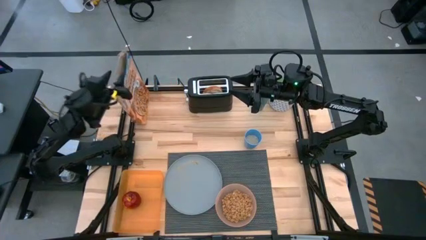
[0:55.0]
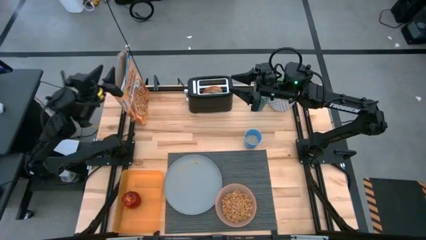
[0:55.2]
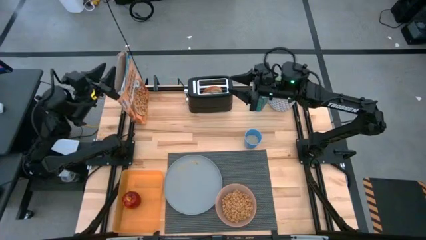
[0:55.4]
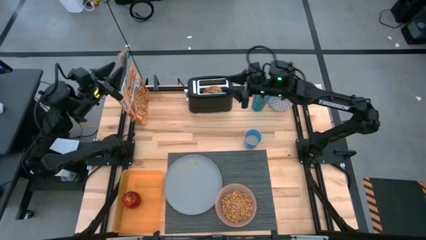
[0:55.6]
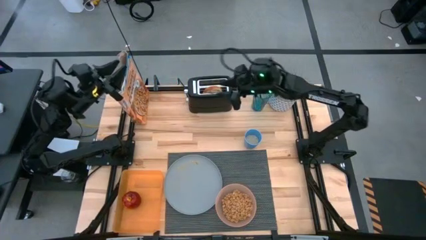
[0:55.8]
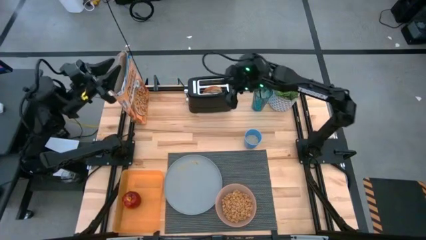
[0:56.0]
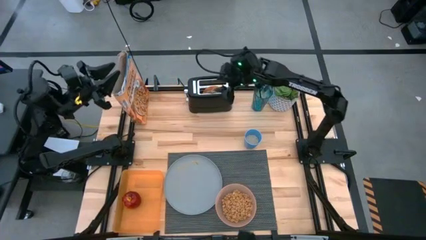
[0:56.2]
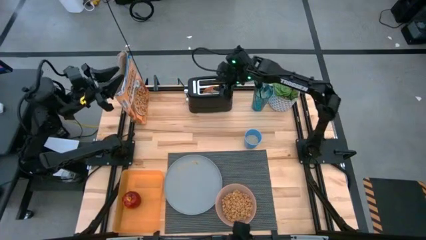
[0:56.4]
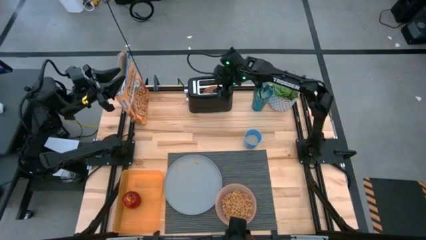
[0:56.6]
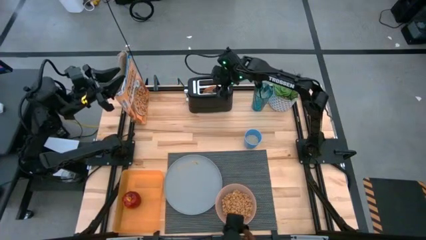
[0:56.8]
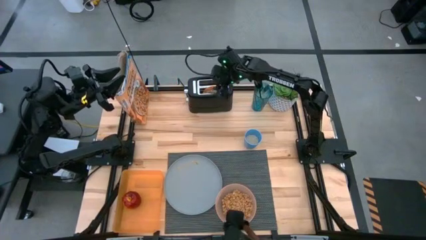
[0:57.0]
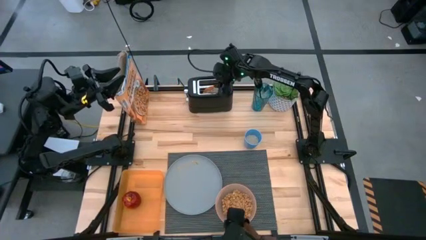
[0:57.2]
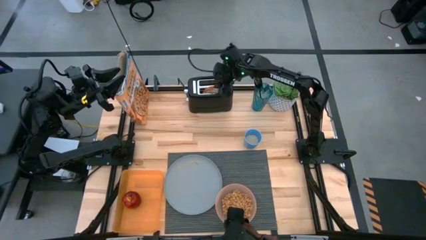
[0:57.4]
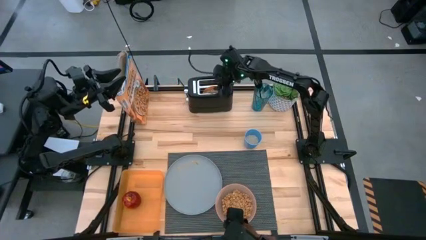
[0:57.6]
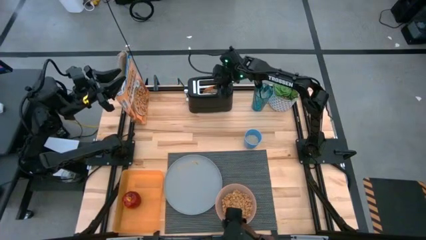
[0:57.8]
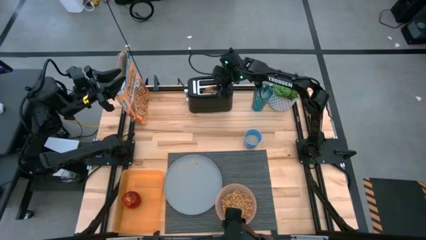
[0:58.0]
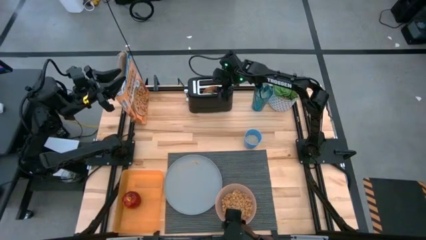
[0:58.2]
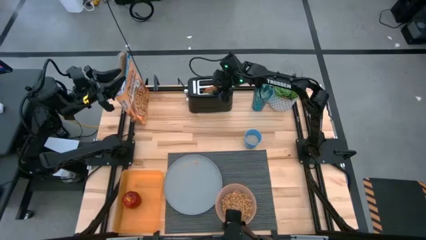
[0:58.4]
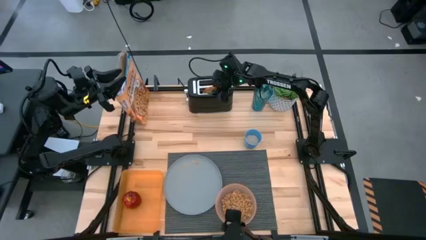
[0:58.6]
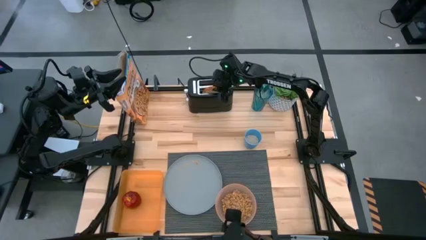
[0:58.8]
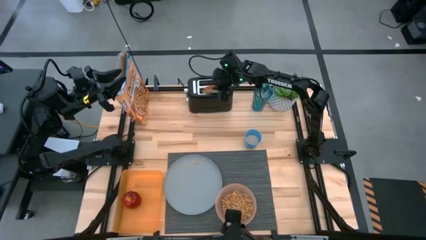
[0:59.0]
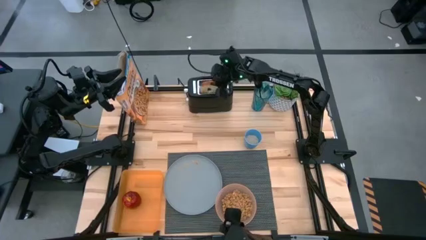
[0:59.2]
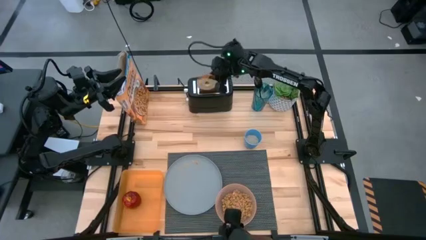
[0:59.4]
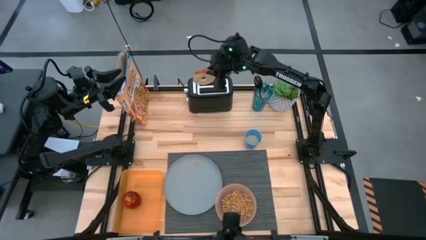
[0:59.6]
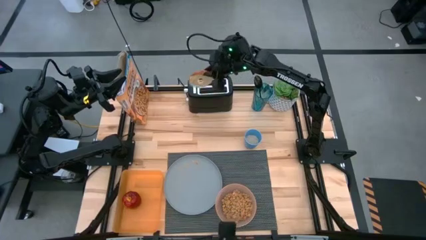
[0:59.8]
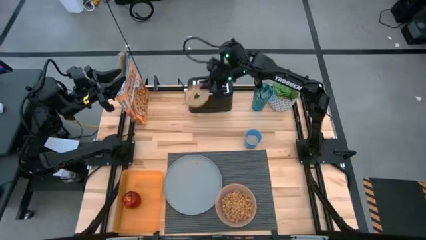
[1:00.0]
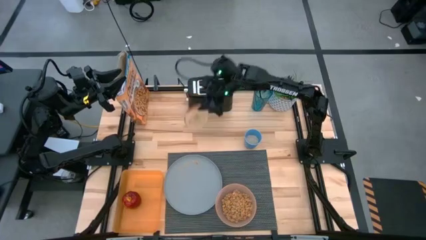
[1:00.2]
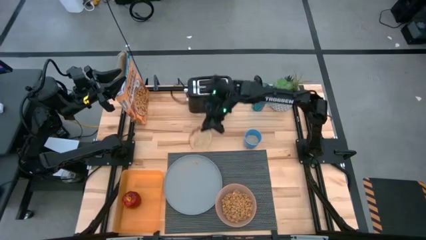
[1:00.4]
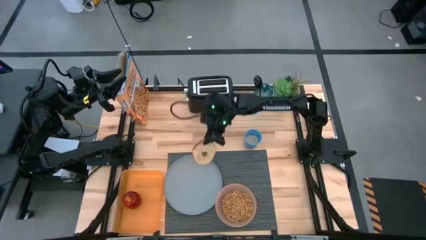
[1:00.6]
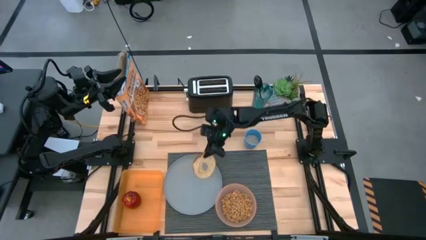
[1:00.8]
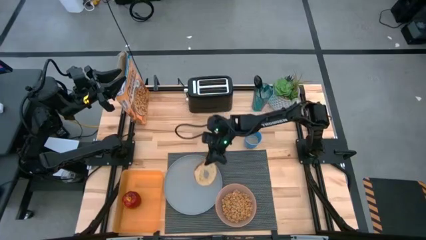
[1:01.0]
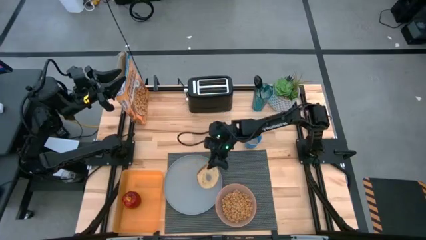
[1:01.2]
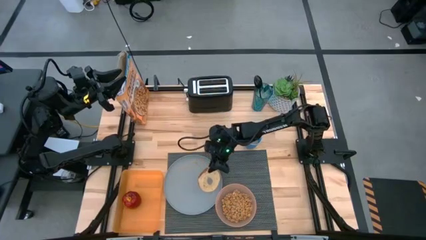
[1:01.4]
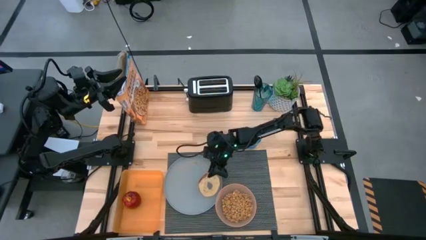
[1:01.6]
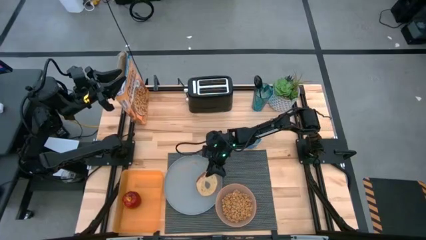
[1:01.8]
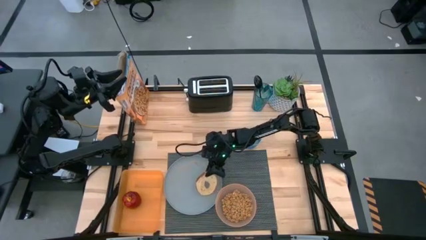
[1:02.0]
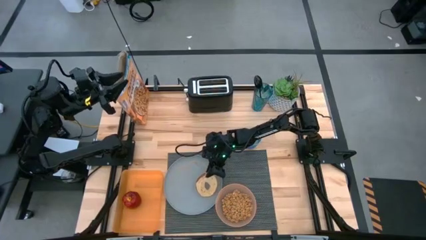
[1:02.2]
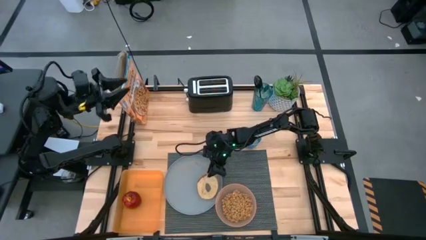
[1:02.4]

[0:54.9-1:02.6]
Task: Arrange a breakfast setting
Put the bread on the gray plate

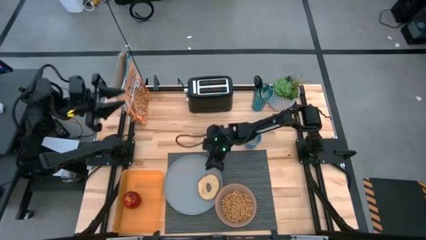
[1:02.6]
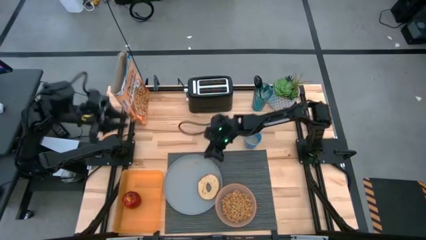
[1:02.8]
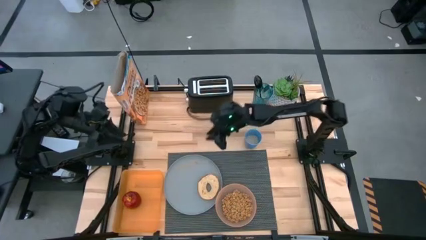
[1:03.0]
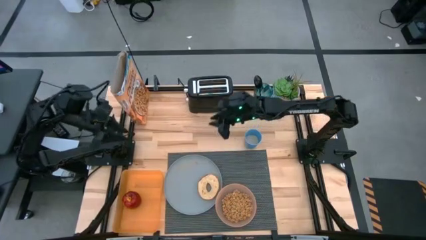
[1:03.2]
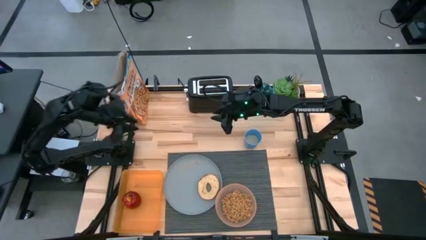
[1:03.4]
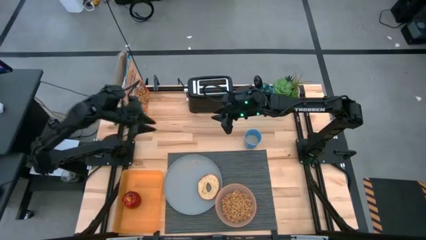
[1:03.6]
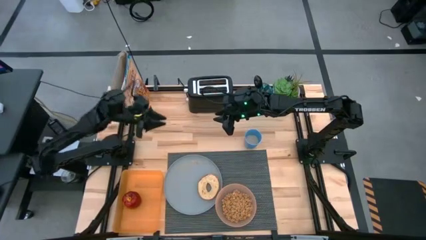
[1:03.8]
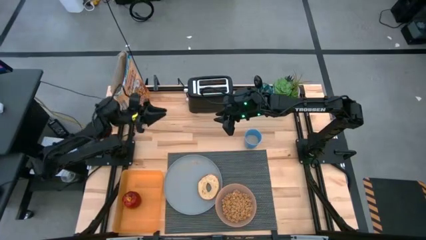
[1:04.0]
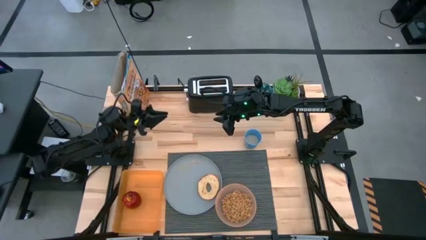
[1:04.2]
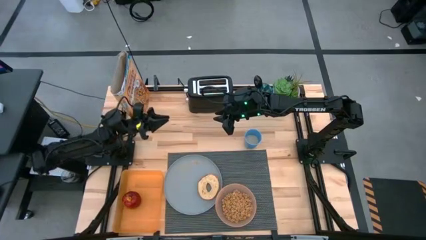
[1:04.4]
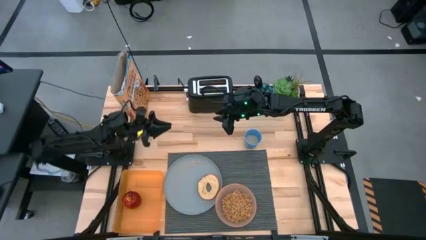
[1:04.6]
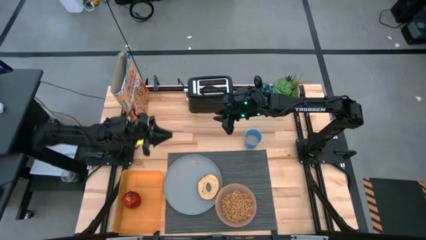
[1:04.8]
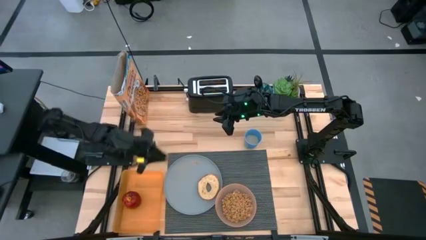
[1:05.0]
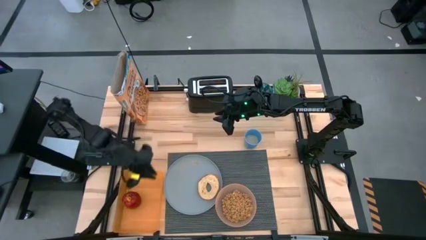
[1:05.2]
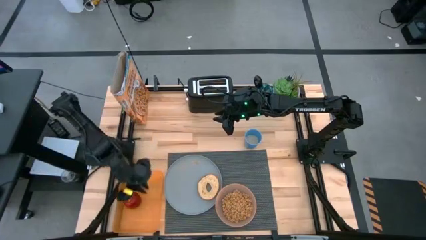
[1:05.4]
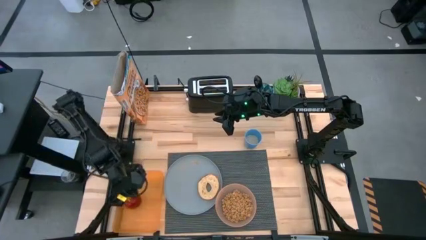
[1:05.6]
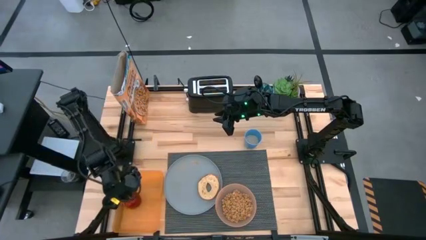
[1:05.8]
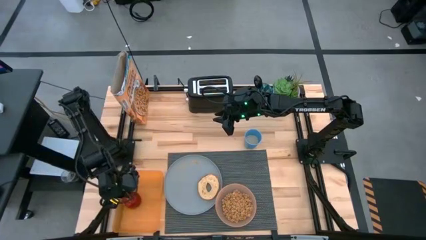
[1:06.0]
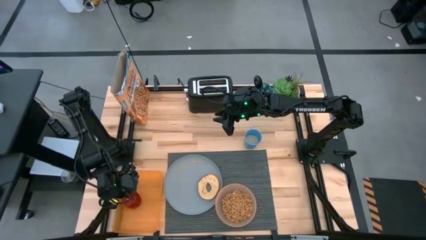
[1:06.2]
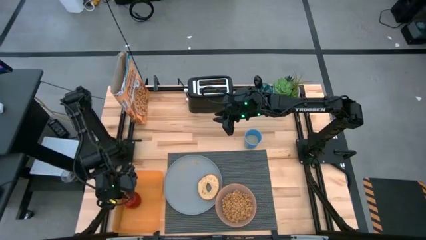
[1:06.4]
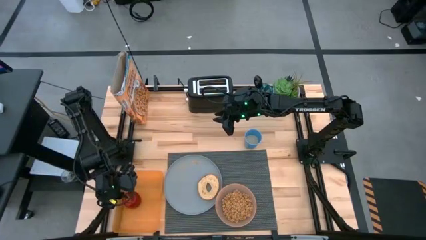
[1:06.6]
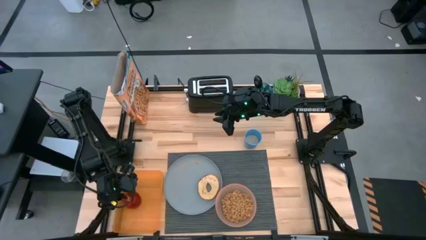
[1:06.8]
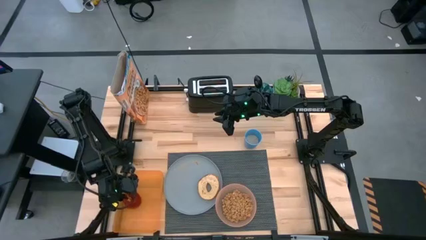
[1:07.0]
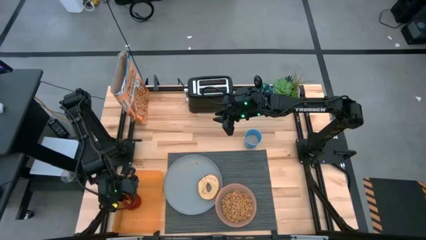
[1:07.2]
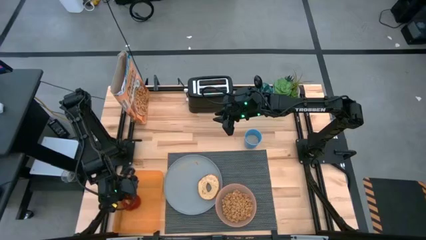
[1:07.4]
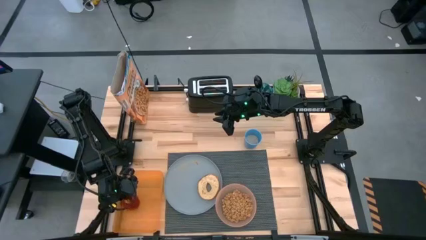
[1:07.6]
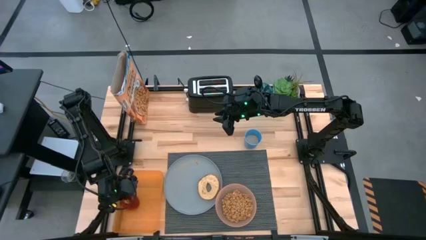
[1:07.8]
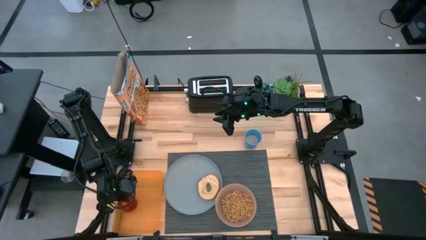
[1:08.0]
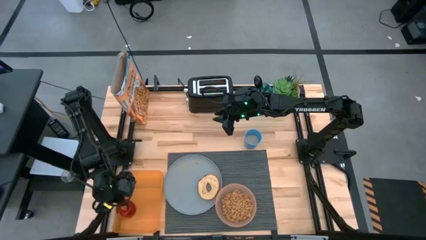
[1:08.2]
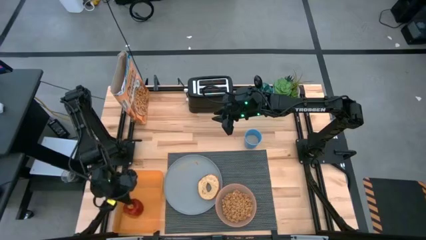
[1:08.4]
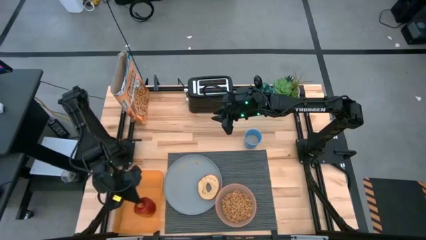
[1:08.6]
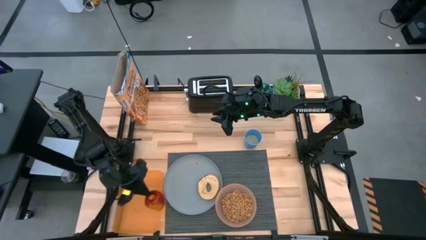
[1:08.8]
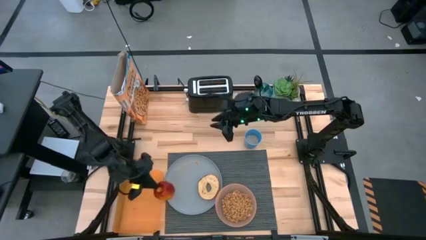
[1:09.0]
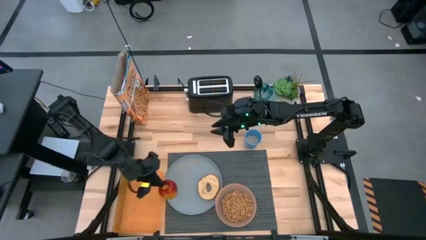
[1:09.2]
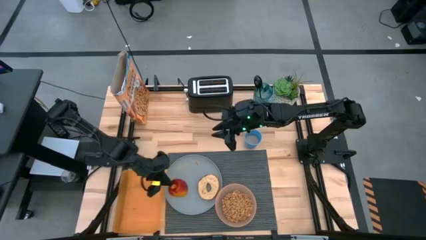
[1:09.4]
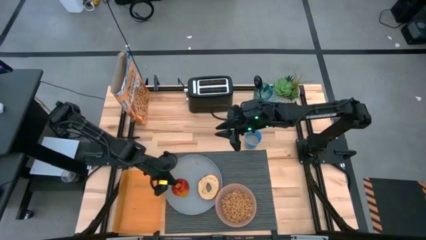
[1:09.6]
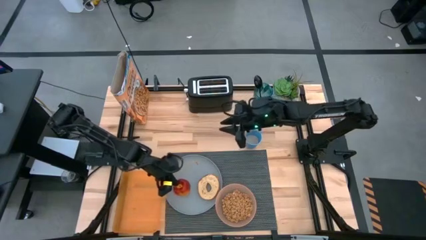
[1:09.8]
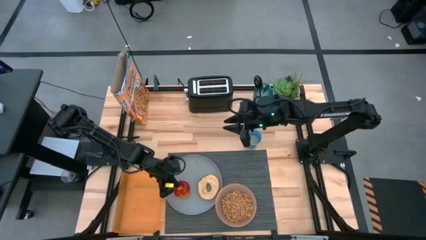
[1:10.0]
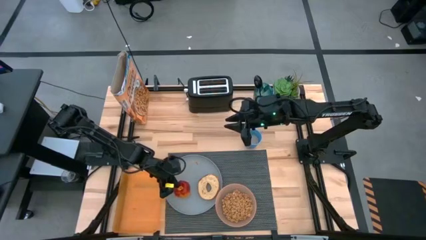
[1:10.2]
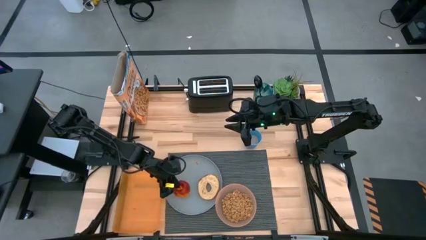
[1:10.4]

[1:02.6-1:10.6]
Put the apple on the gray plate
